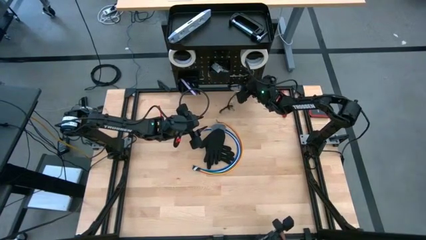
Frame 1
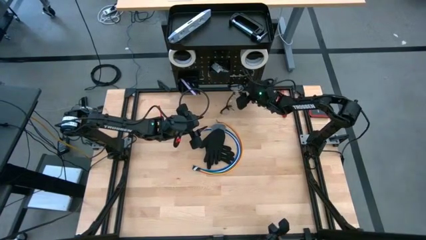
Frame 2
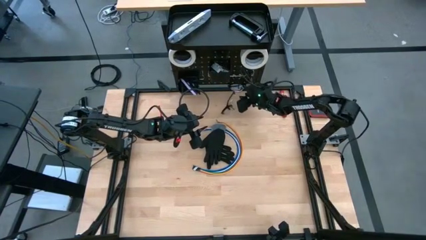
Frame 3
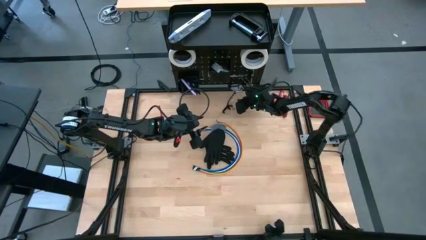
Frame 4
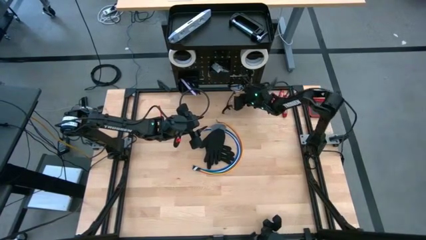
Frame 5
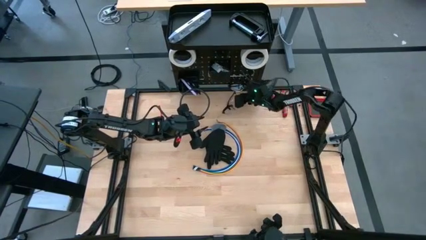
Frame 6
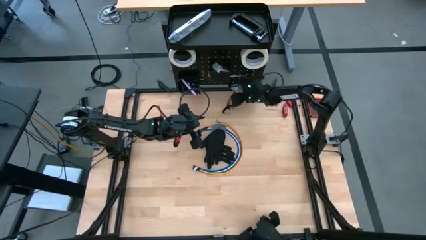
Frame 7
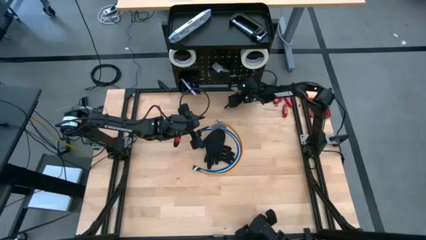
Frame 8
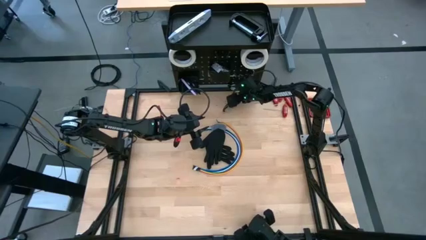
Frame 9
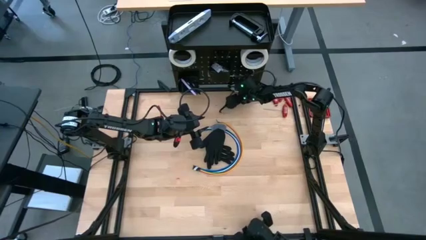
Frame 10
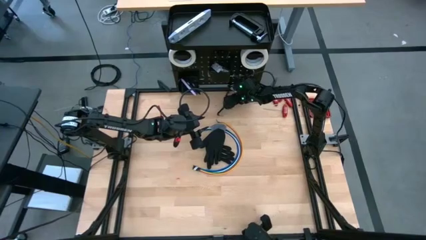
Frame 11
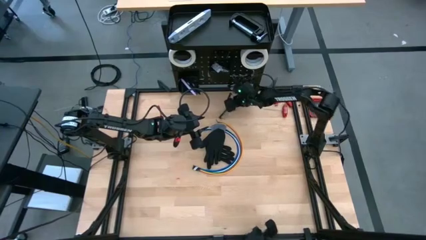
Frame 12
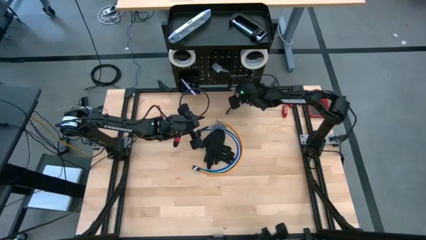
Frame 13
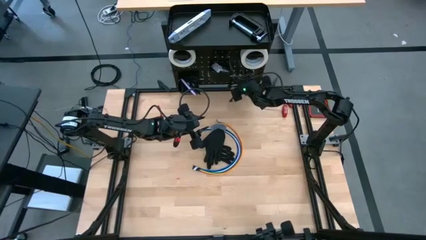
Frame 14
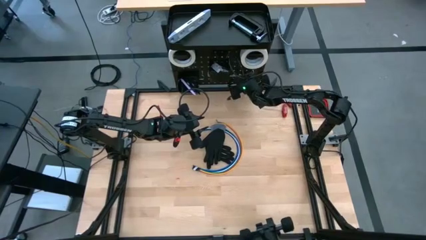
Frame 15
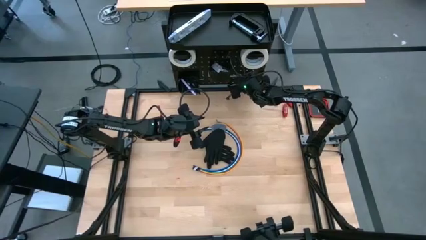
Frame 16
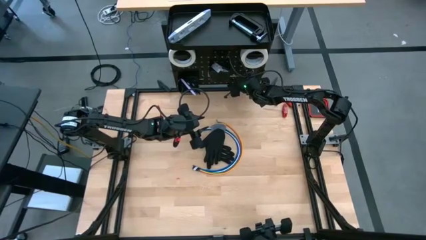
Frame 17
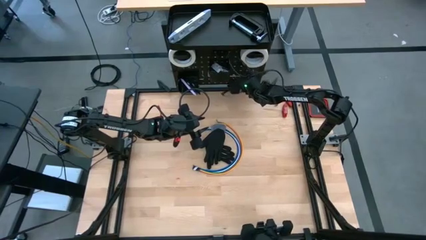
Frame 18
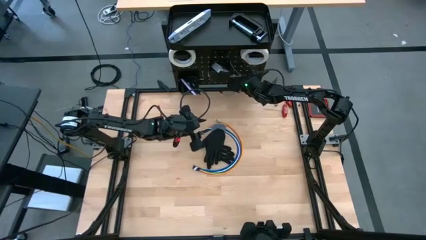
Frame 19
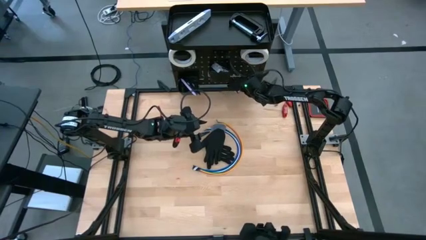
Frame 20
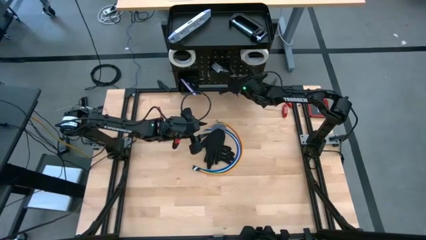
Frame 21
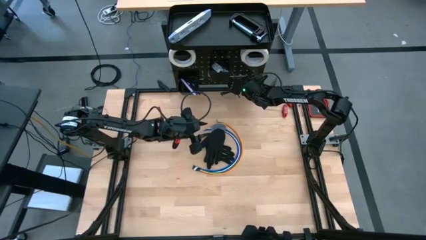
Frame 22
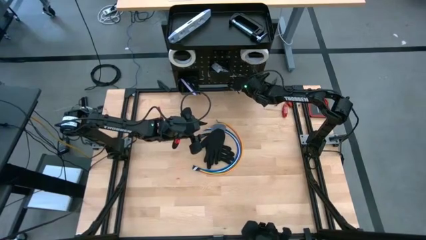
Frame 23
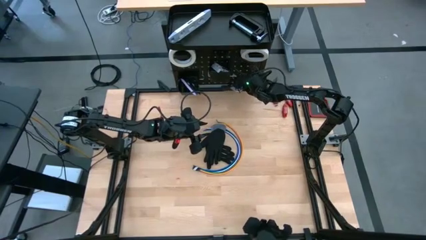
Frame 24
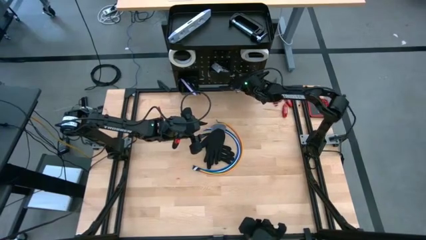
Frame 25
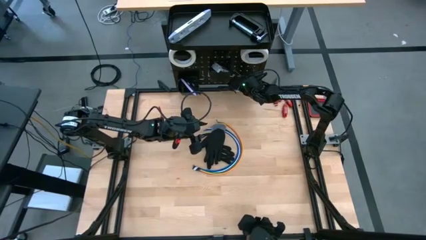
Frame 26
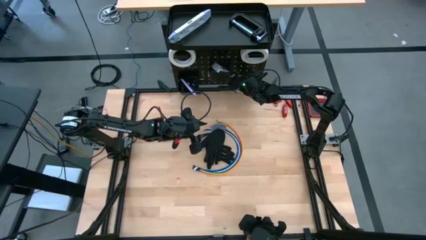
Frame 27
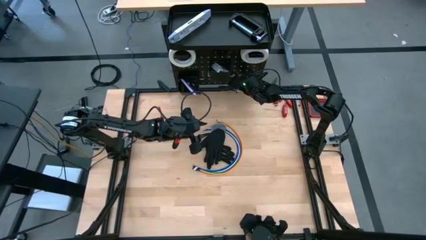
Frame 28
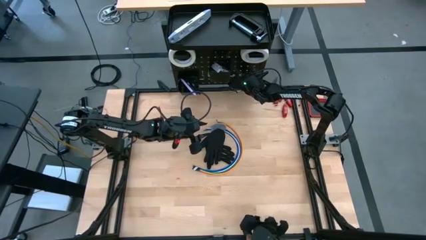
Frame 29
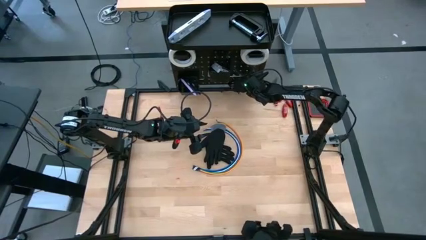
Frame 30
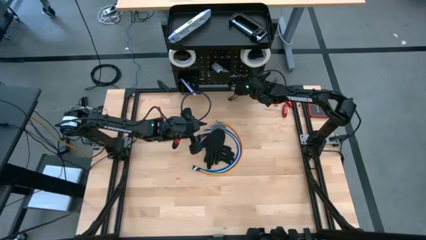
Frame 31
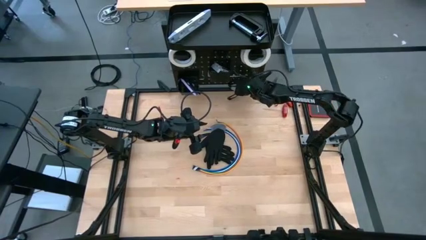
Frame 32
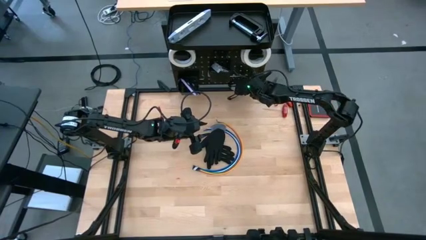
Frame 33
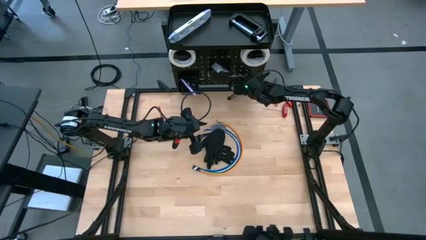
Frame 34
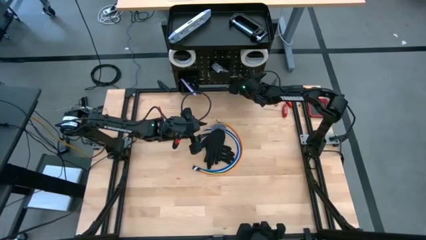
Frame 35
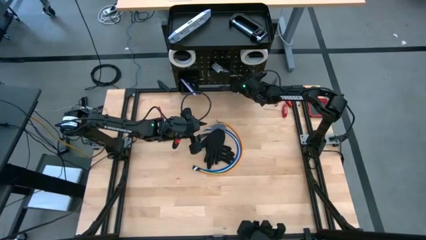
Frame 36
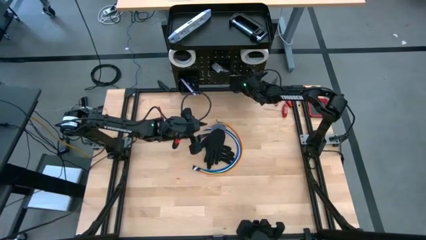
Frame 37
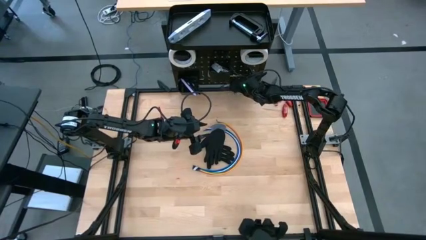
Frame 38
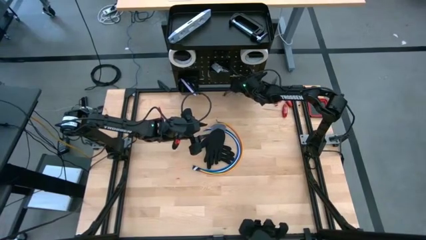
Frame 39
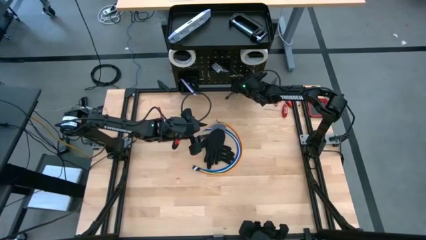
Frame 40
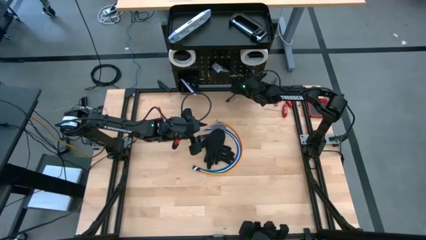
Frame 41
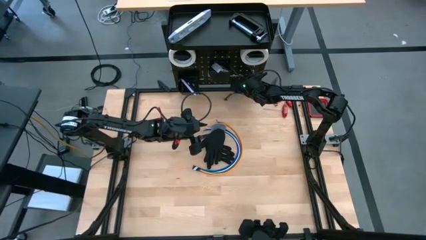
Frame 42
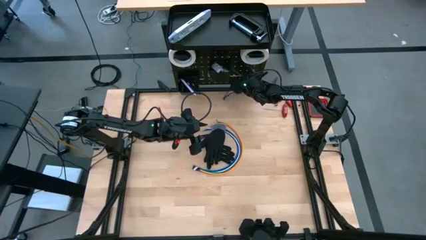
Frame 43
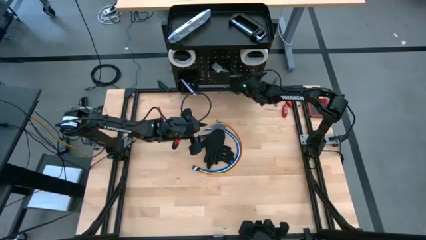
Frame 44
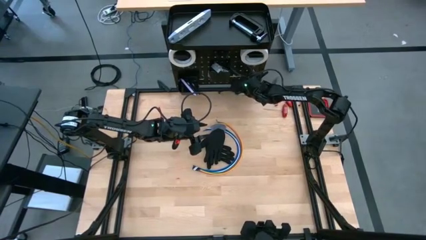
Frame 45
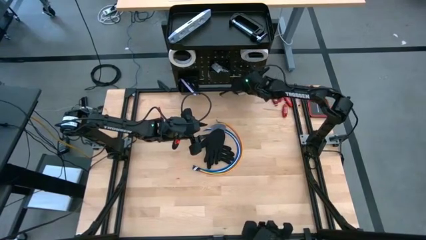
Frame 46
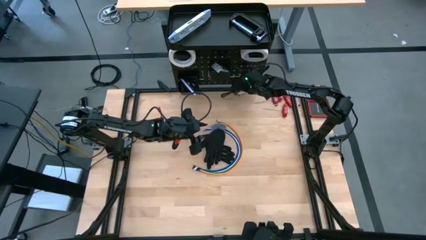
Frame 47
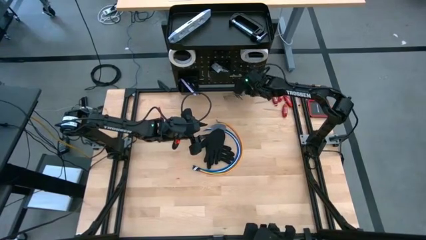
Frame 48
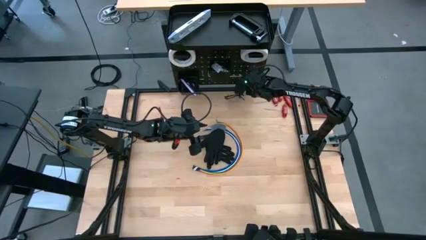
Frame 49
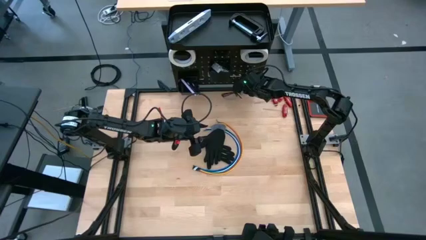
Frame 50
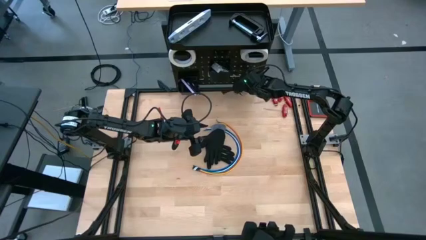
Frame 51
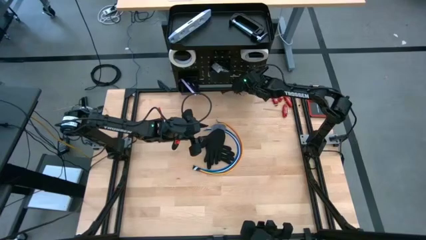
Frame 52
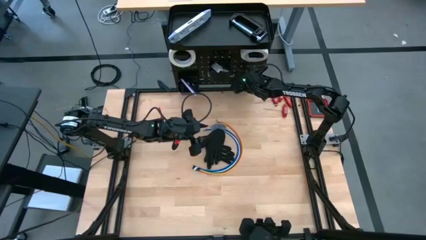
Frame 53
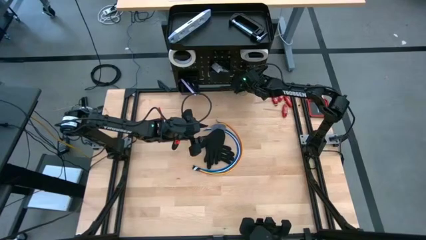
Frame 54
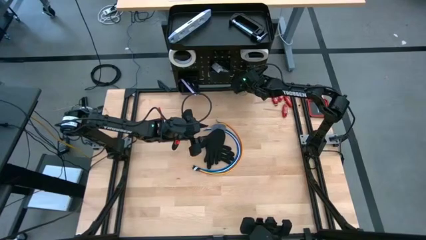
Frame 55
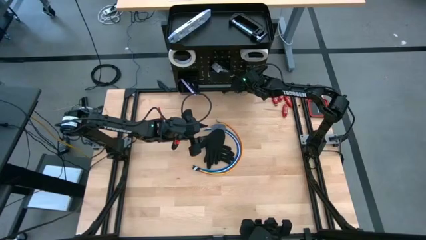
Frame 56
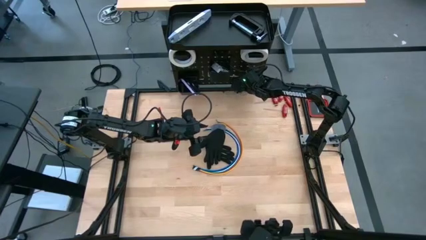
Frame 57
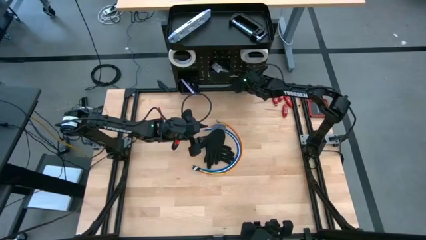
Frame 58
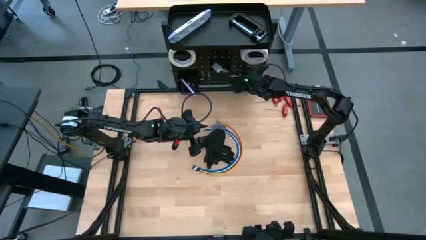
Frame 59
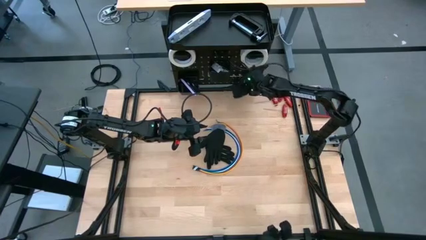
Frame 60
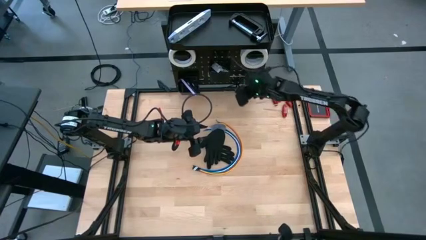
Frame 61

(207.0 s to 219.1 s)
Task: Hang tools onto peg board
Hang the safety goggle on the peg board

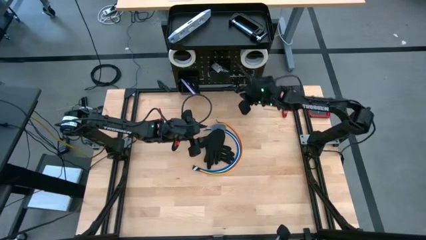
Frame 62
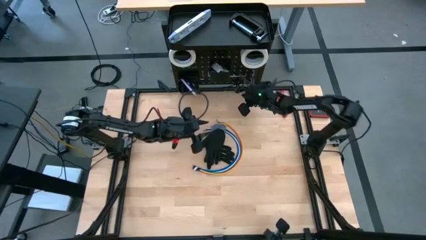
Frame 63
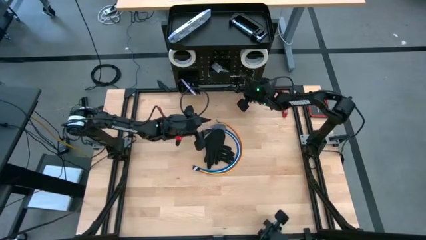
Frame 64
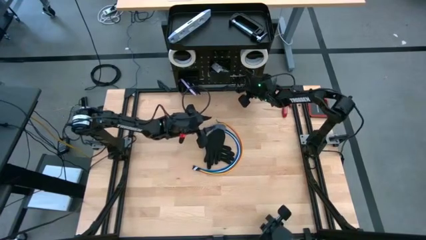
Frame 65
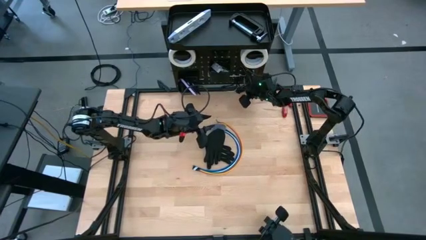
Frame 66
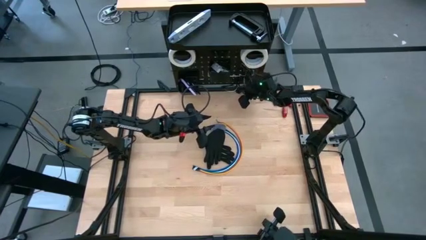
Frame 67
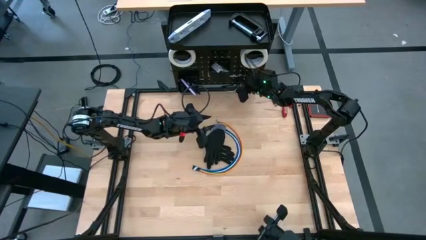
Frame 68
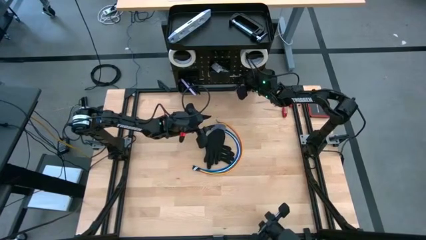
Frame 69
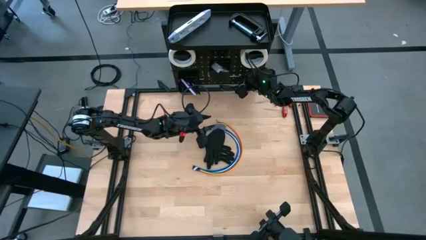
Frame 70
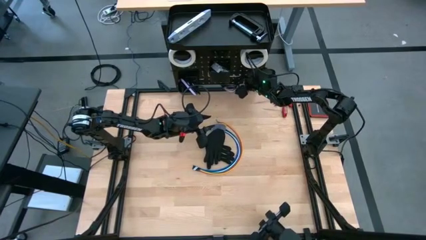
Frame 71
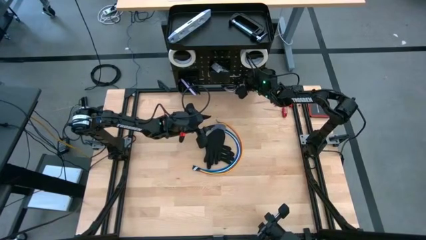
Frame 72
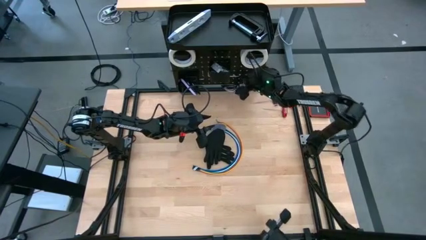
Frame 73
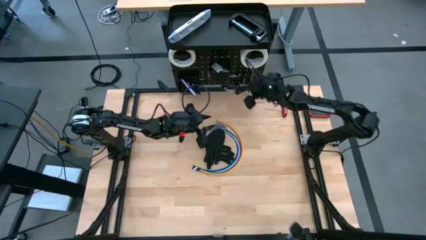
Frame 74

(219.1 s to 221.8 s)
Adjust the safety goggle on the peg board

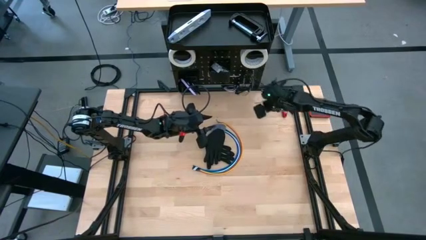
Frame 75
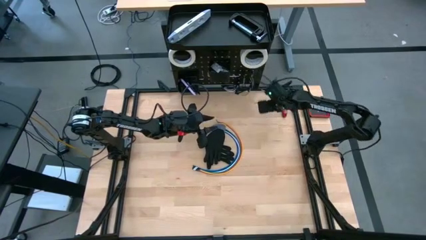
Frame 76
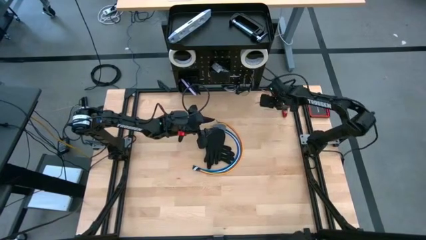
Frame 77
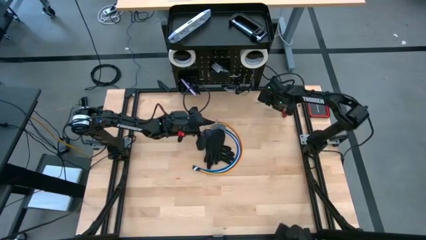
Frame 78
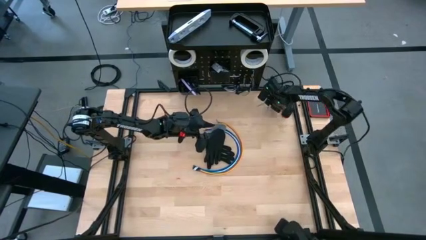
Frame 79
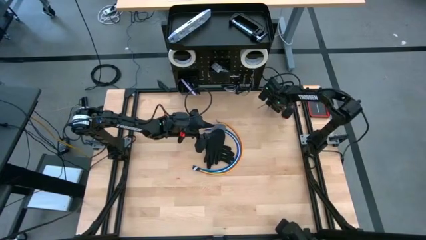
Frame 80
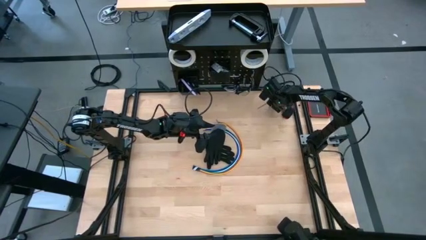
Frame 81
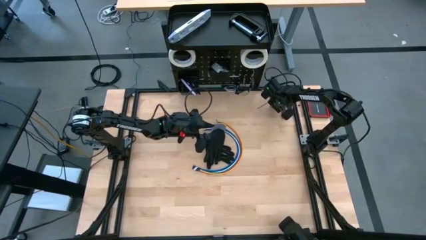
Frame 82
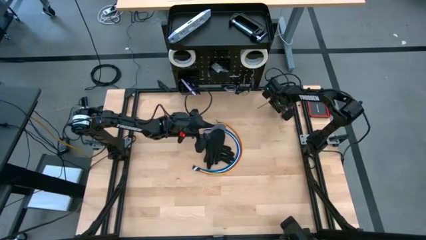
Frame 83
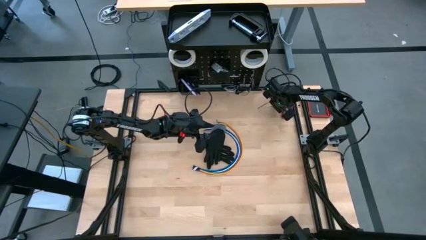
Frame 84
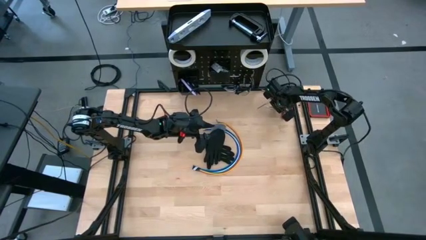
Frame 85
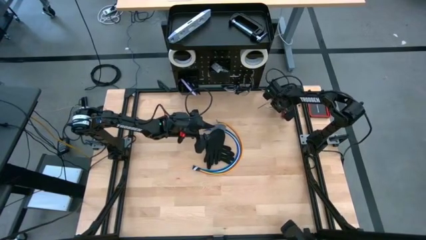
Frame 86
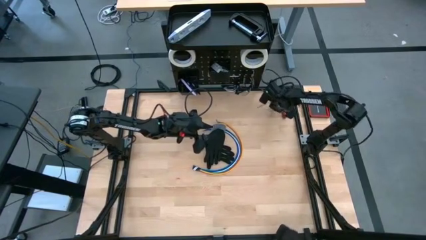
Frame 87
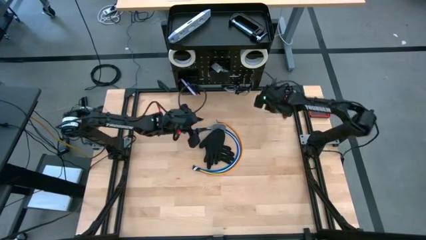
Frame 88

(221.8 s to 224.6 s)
Hang the red allen wrench on the peg board
